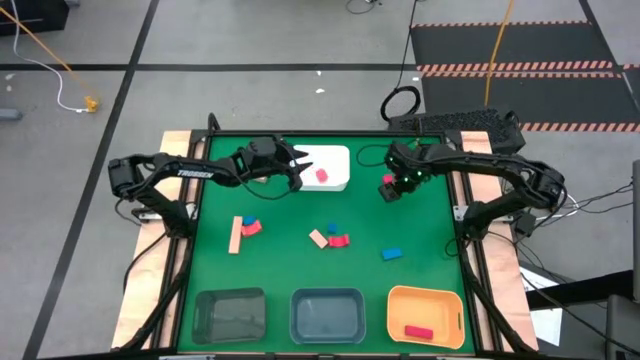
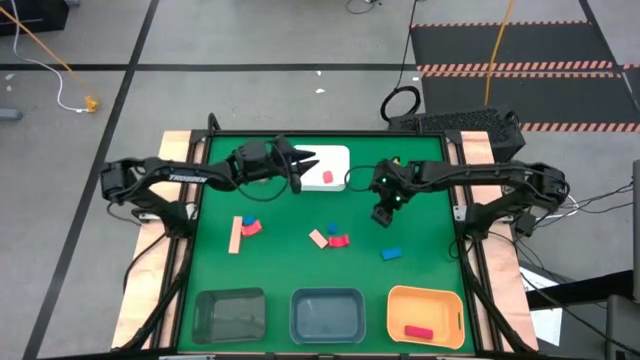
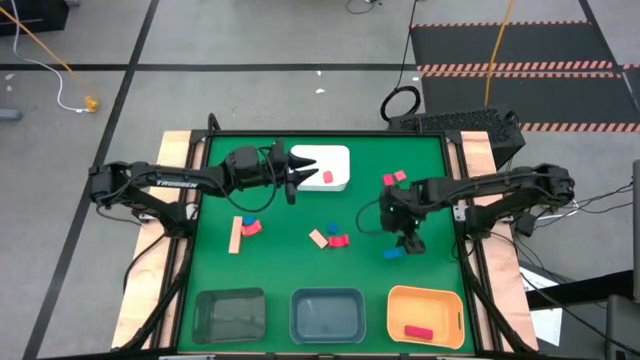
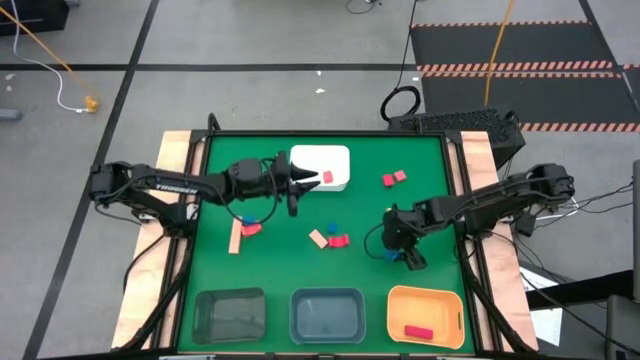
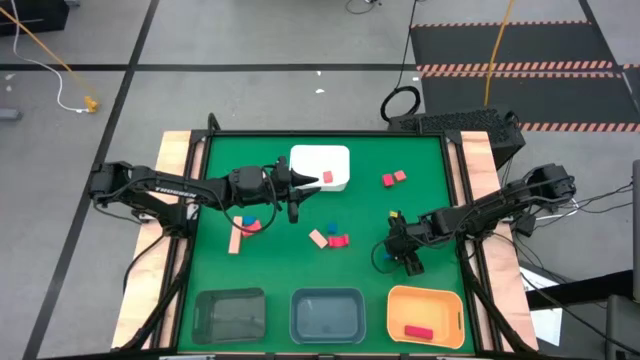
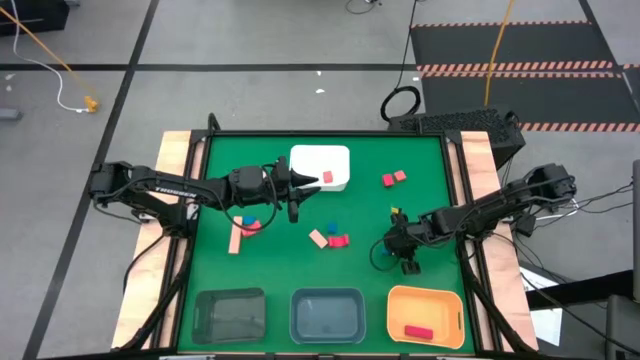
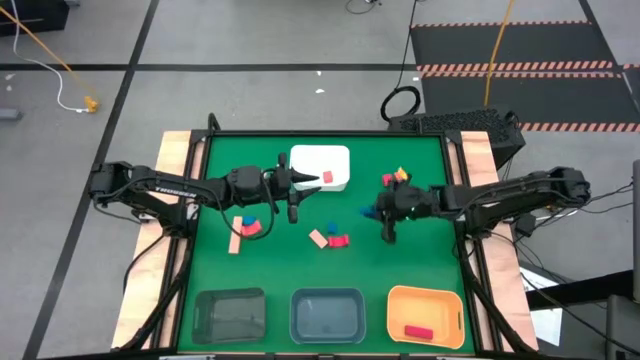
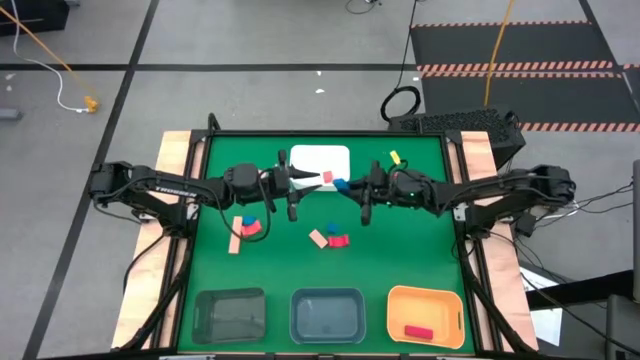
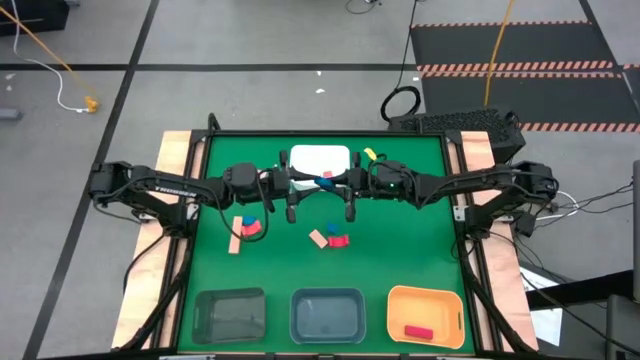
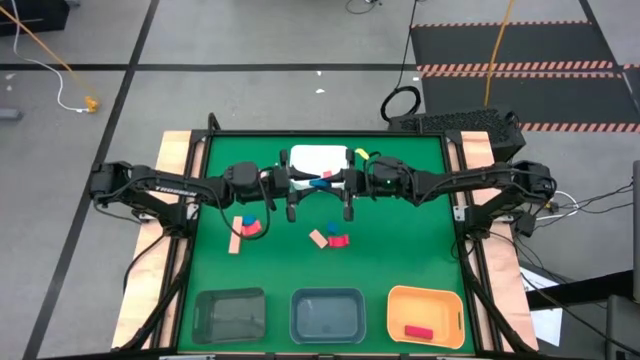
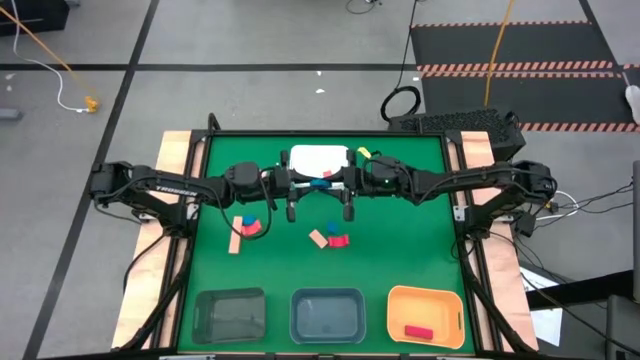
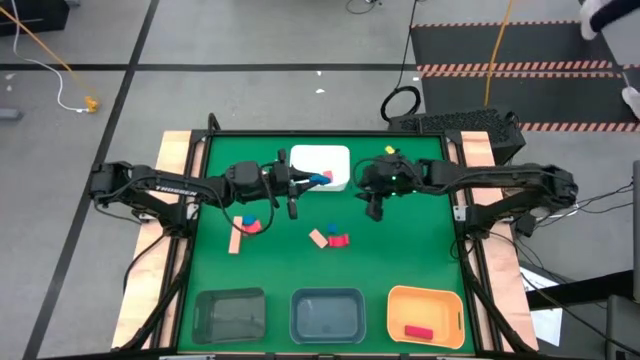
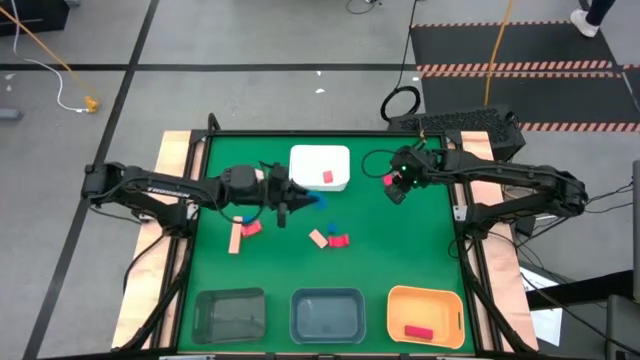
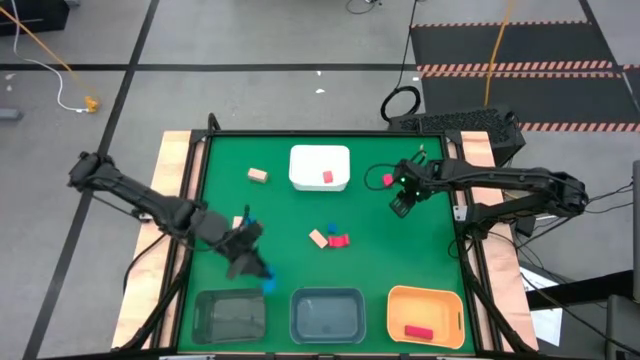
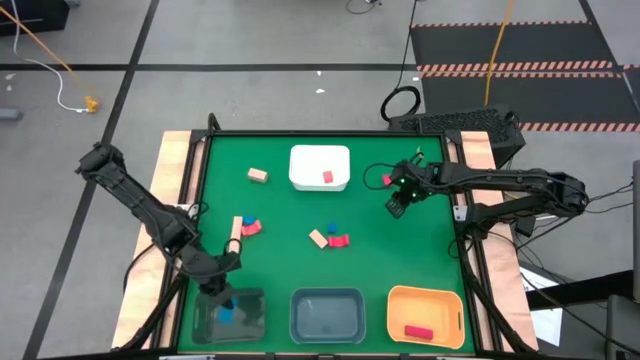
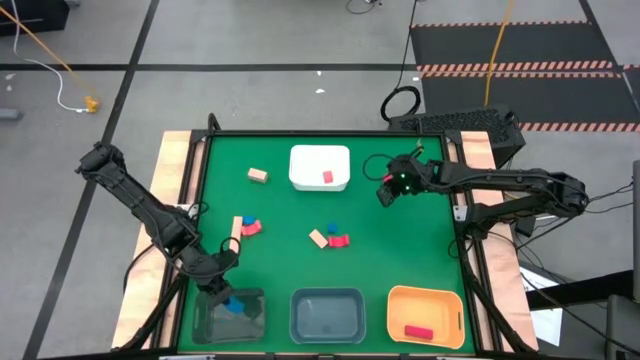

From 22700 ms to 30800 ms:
Task: Sort & place blocks by color
Put the left blue block into the black bin

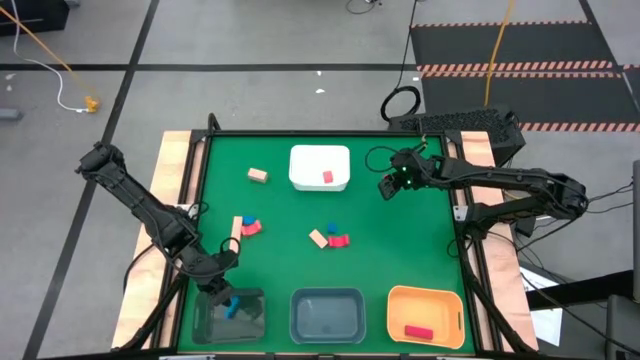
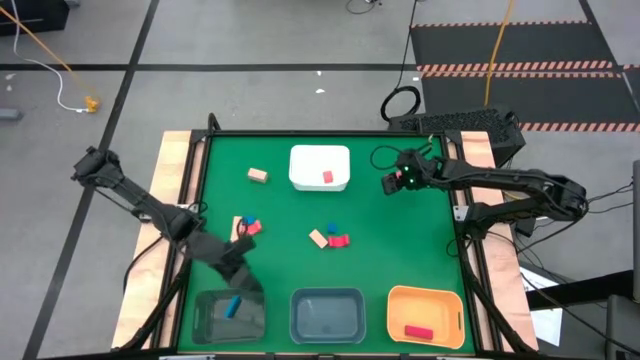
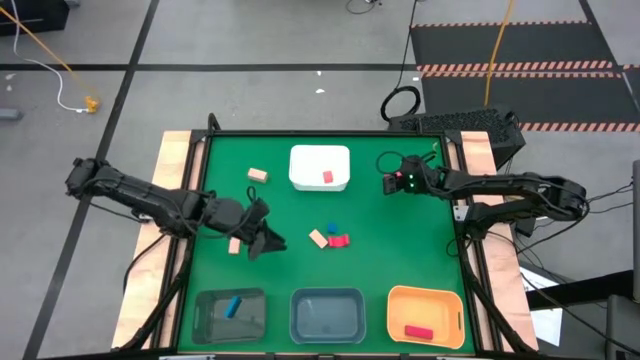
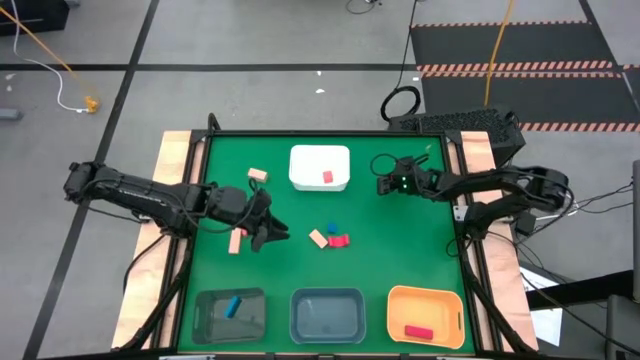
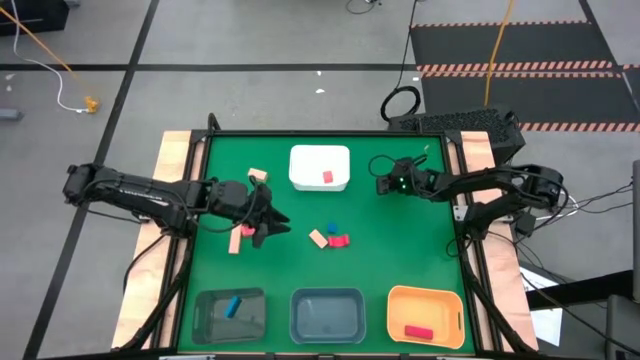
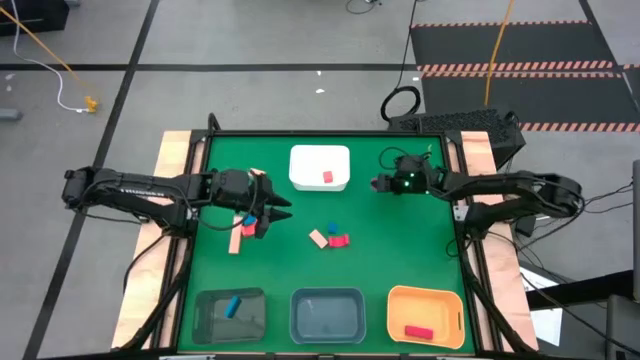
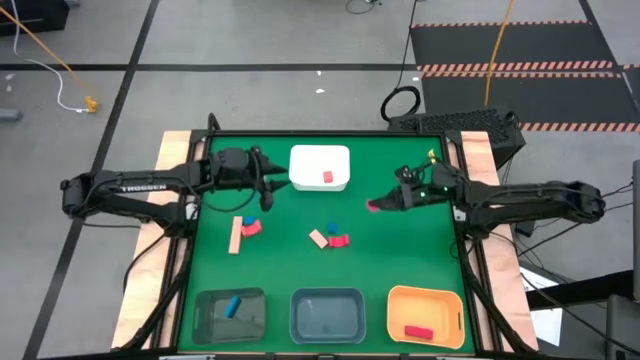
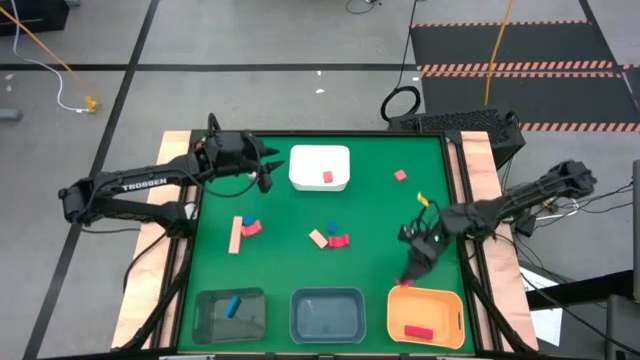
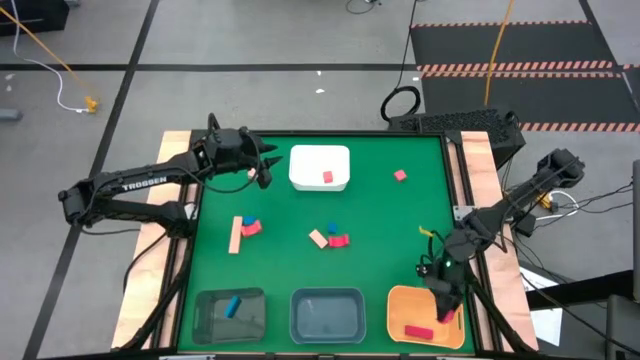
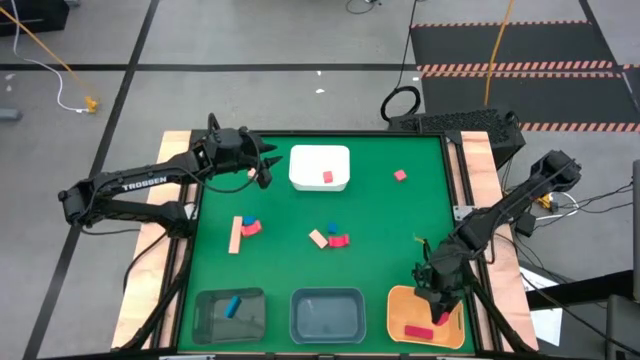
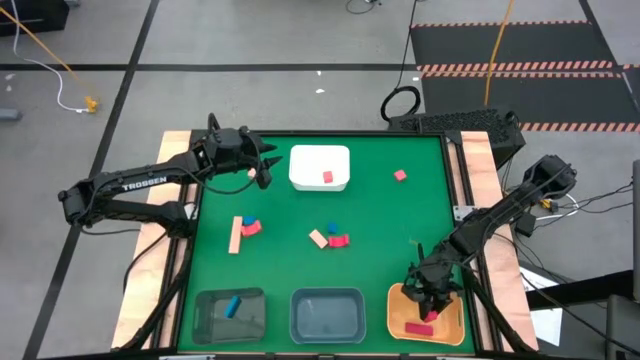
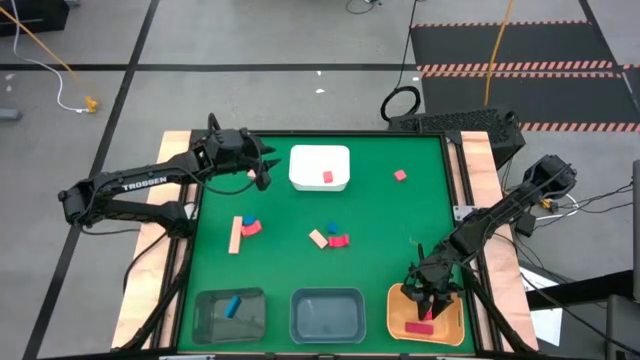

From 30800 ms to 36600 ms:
Put the top red block into the yellow bin

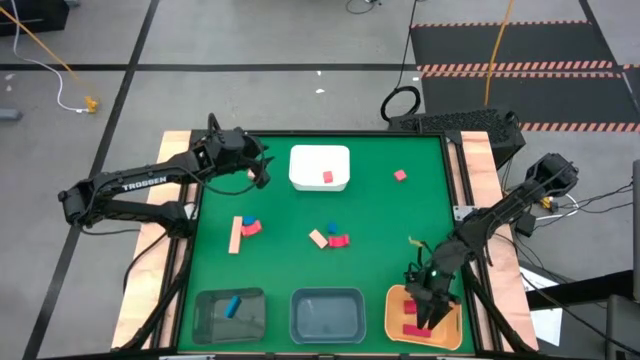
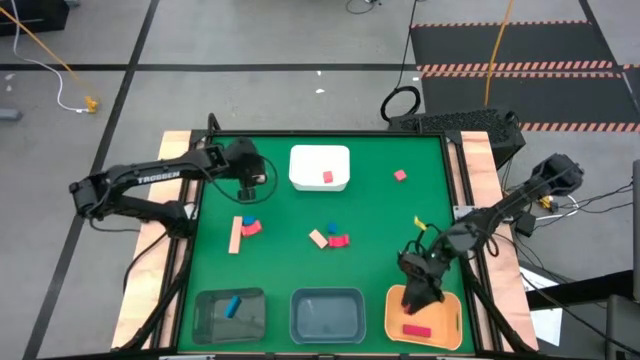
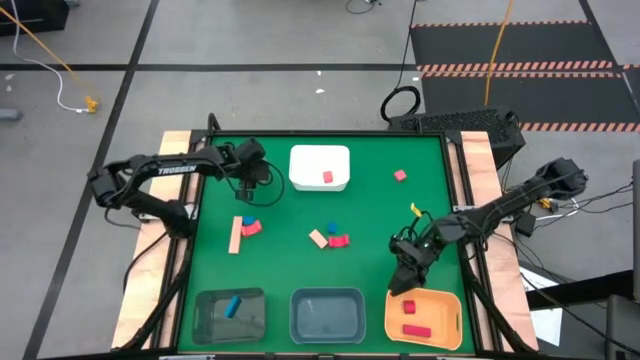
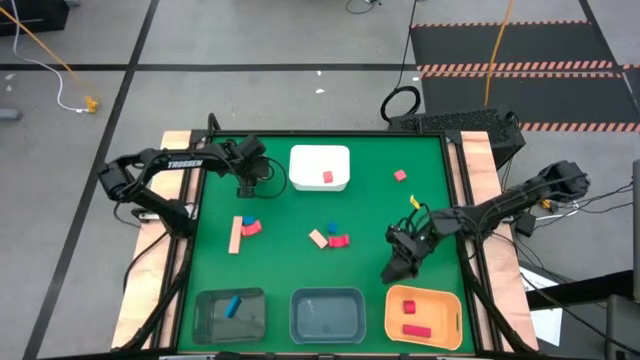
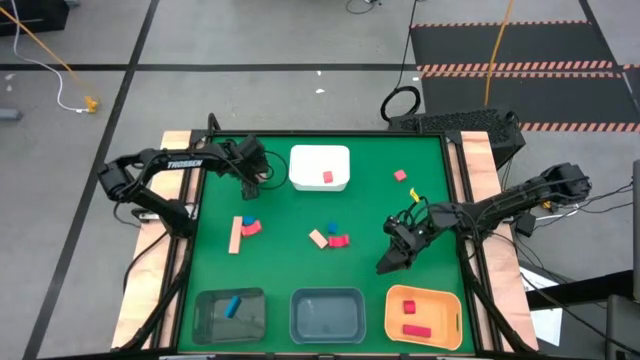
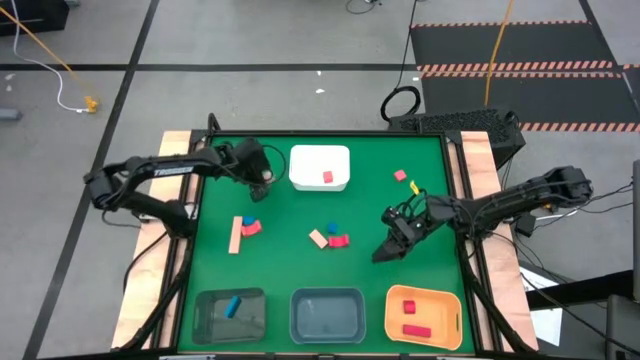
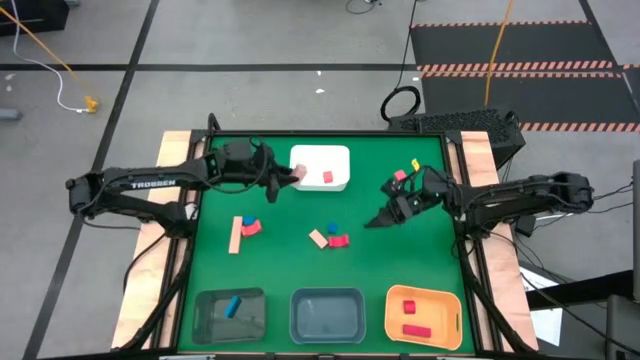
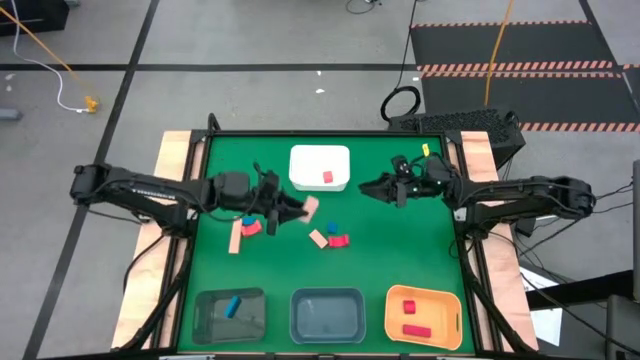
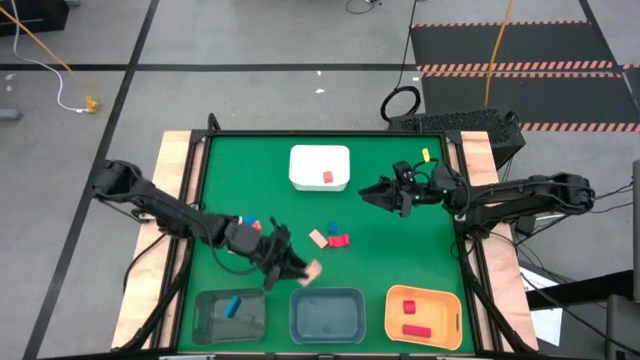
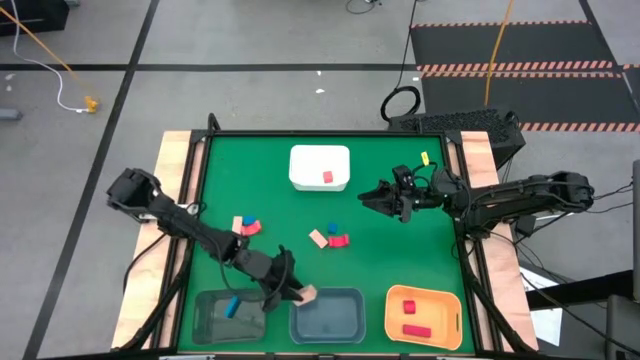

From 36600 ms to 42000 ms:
Put the top brown block into the blue bin

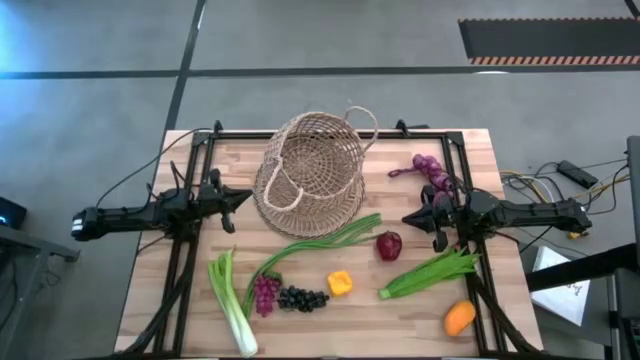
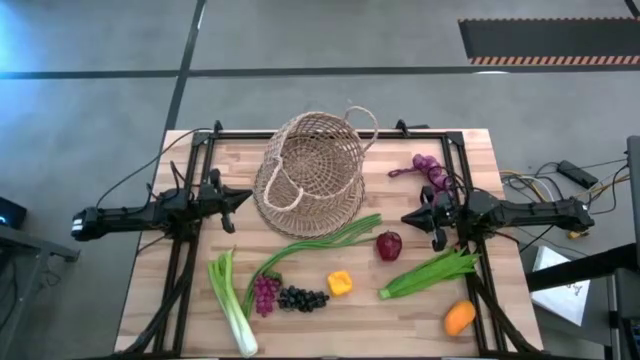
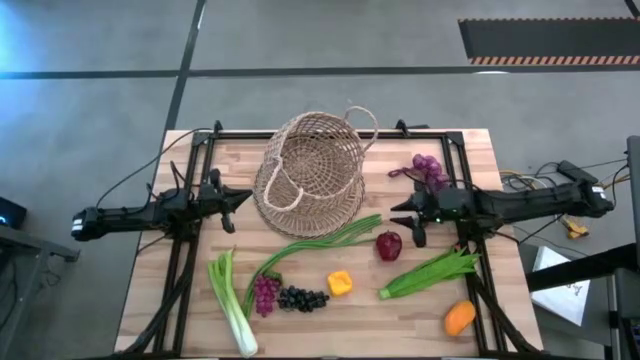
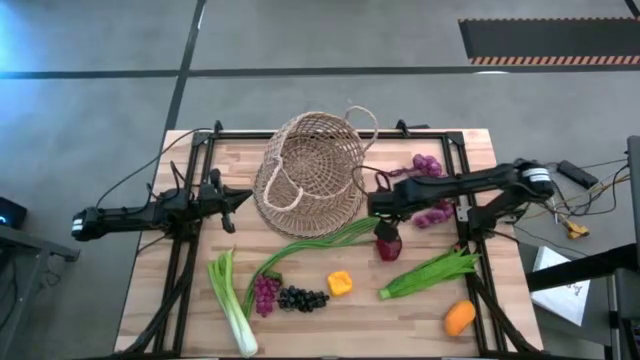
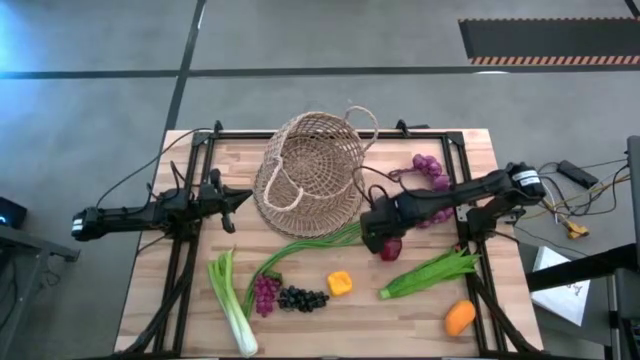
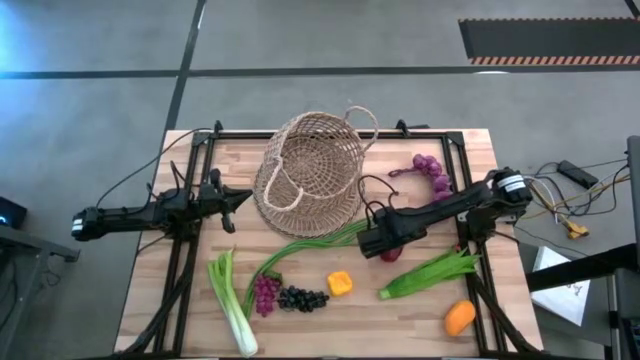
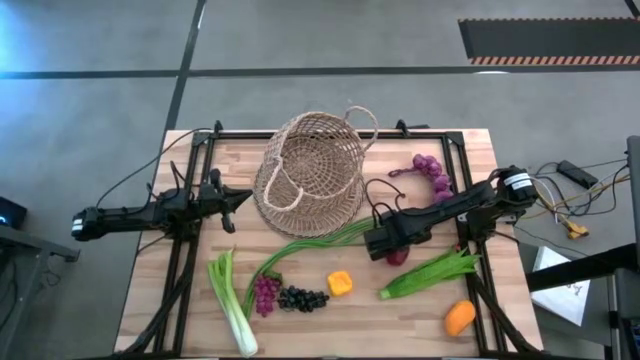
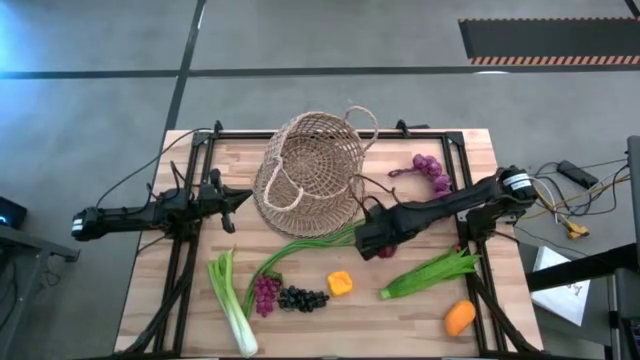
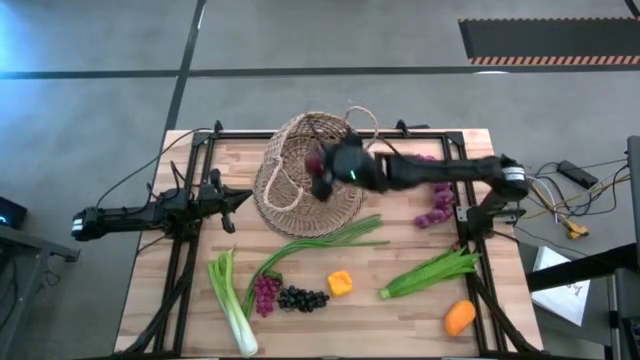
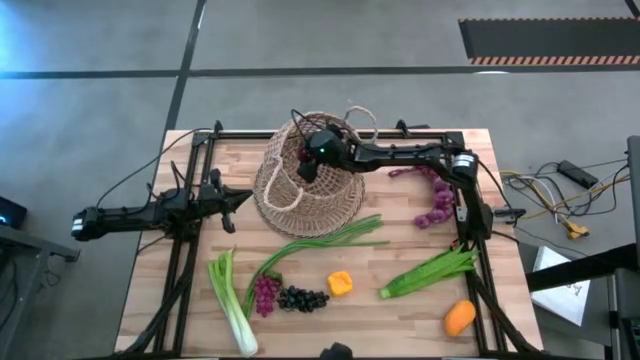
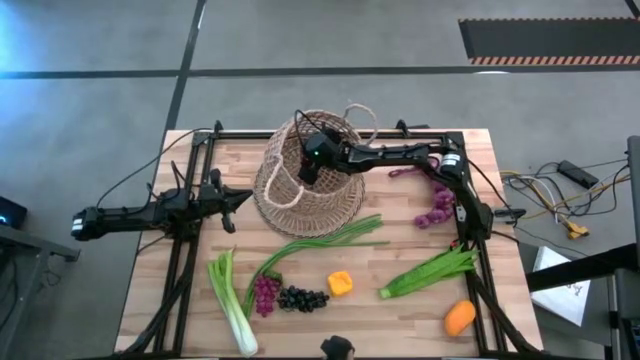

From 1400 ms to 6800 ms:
Task: Build produce basket
Put the red apple into the brown basket
